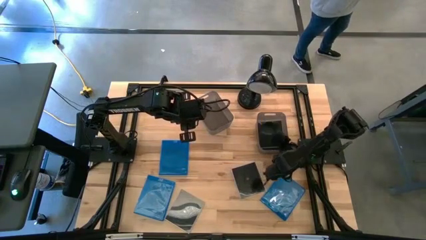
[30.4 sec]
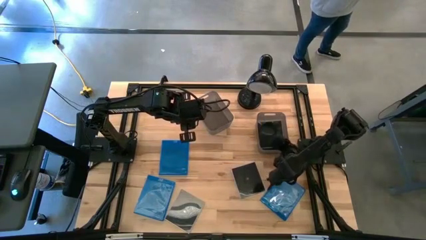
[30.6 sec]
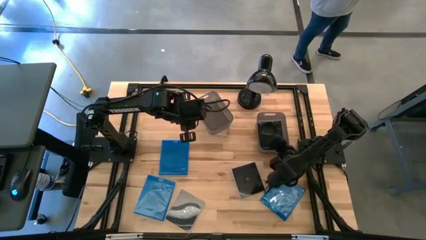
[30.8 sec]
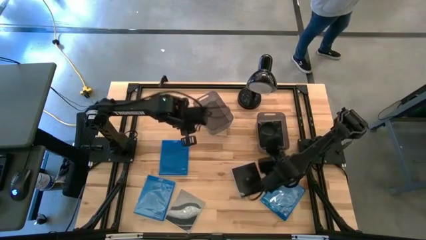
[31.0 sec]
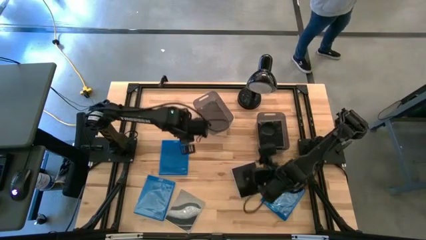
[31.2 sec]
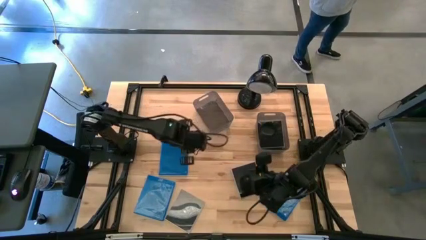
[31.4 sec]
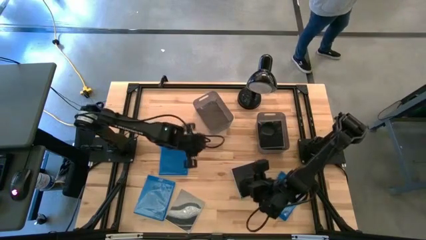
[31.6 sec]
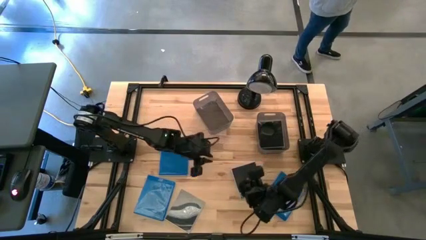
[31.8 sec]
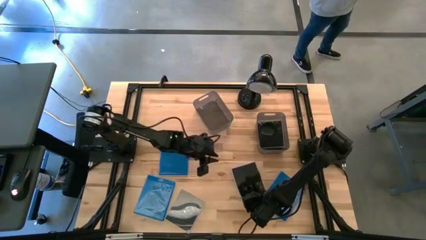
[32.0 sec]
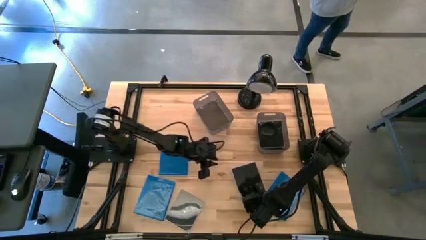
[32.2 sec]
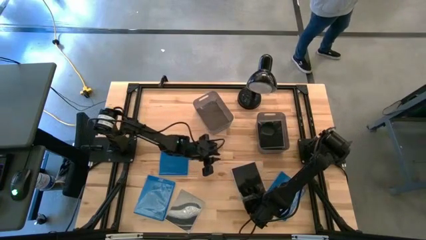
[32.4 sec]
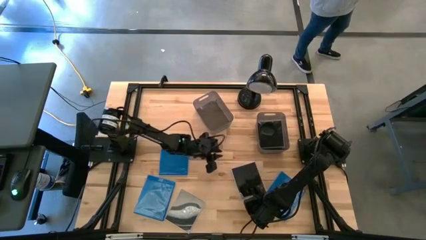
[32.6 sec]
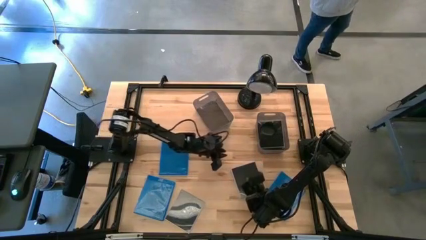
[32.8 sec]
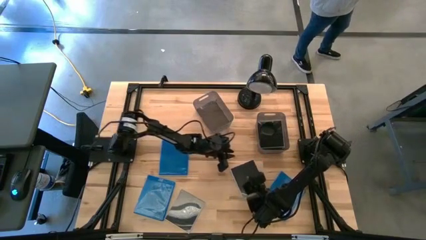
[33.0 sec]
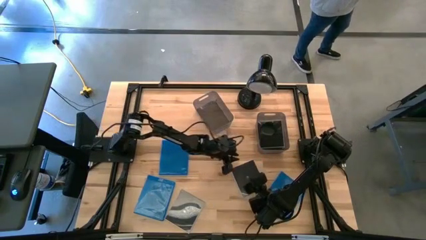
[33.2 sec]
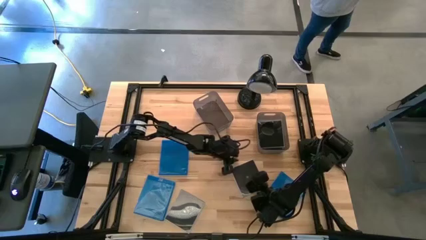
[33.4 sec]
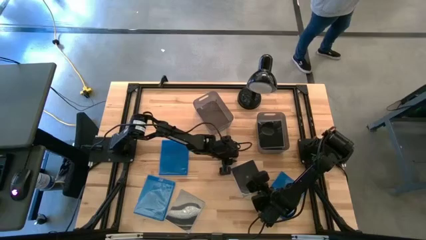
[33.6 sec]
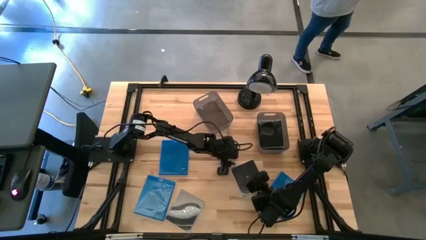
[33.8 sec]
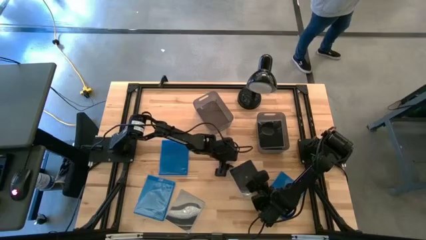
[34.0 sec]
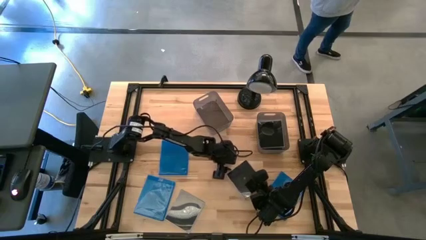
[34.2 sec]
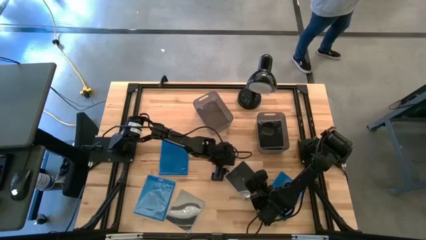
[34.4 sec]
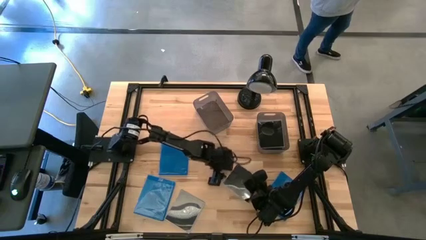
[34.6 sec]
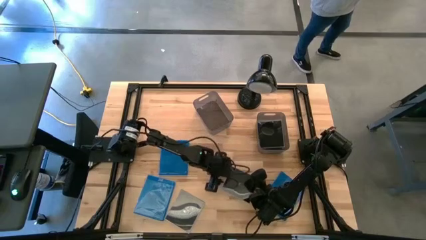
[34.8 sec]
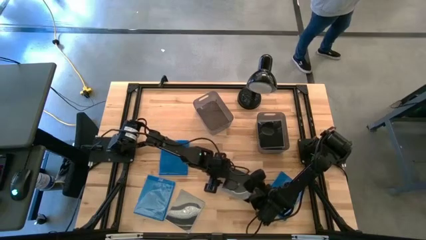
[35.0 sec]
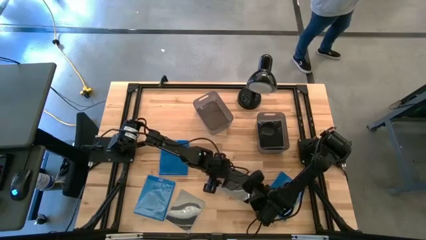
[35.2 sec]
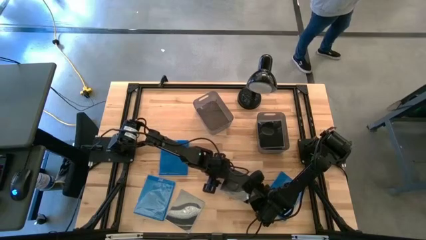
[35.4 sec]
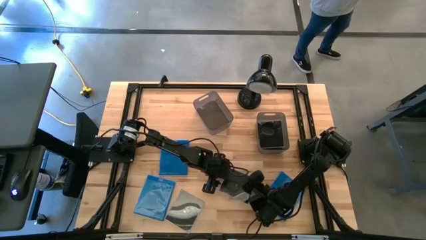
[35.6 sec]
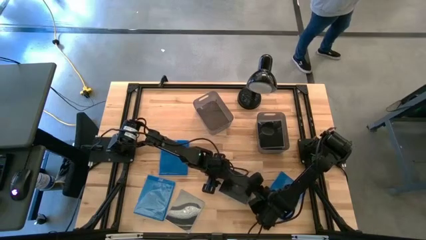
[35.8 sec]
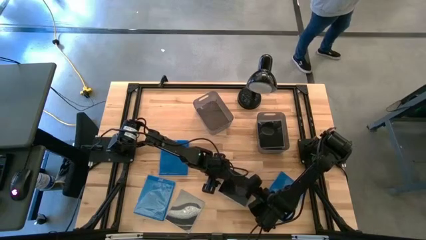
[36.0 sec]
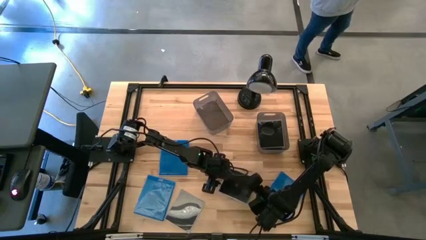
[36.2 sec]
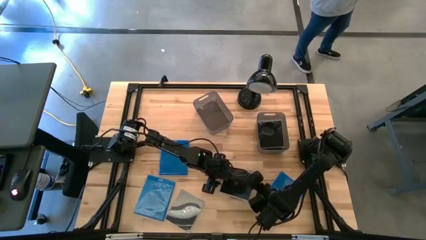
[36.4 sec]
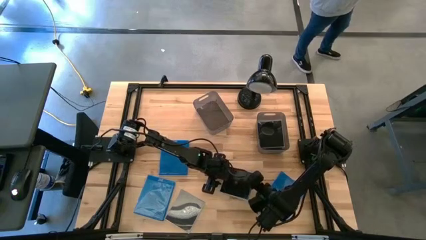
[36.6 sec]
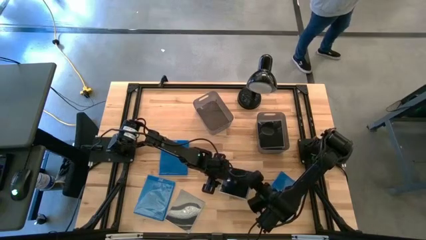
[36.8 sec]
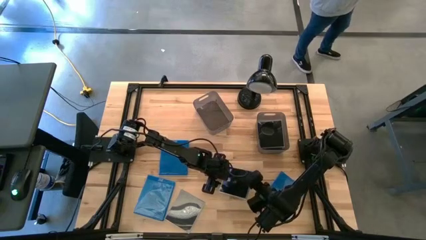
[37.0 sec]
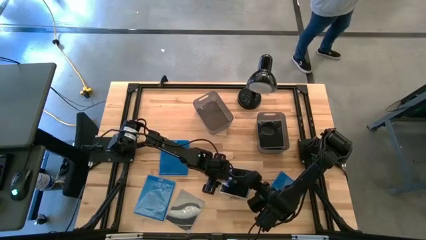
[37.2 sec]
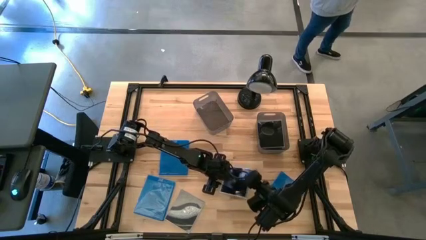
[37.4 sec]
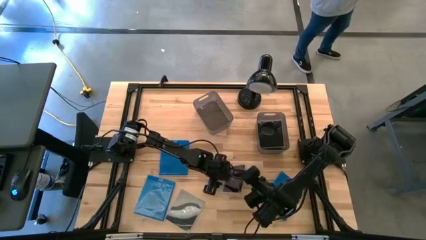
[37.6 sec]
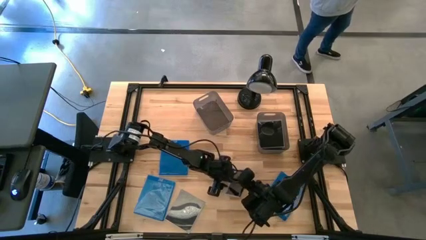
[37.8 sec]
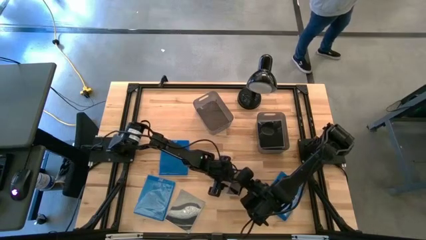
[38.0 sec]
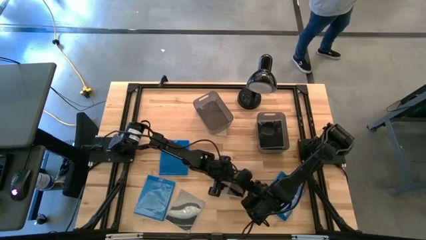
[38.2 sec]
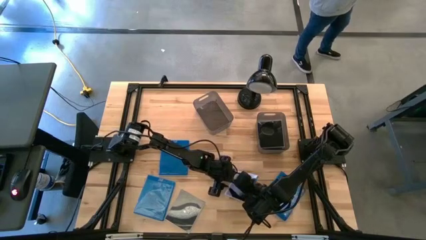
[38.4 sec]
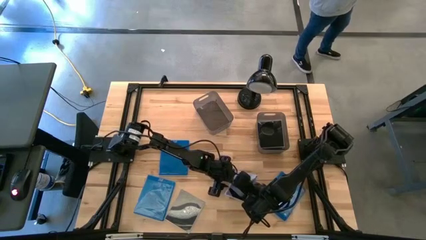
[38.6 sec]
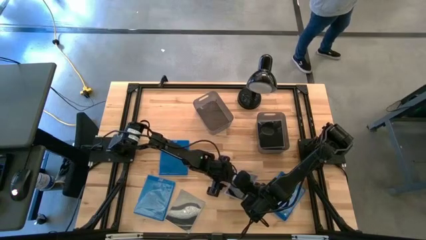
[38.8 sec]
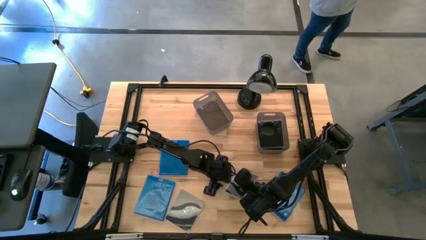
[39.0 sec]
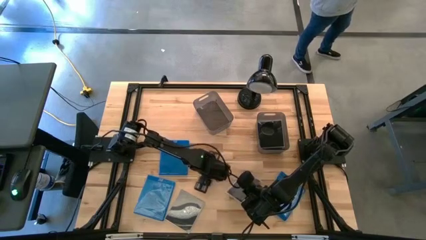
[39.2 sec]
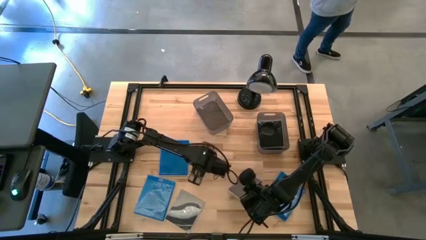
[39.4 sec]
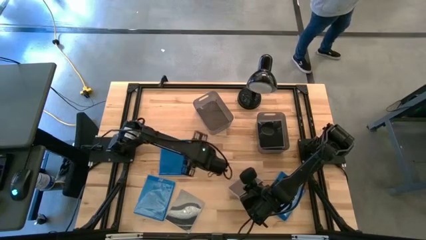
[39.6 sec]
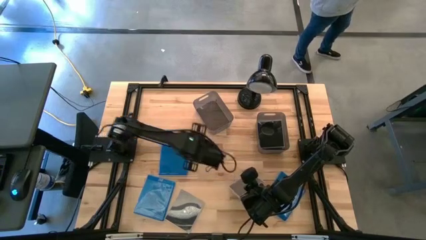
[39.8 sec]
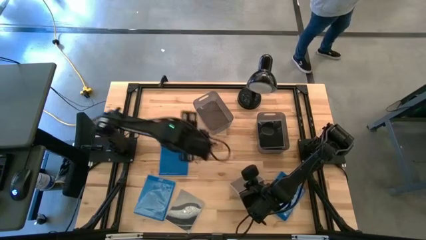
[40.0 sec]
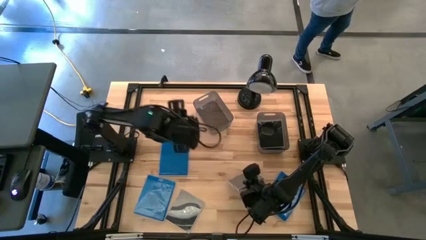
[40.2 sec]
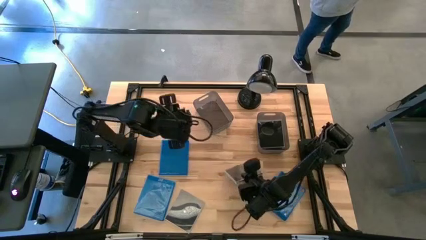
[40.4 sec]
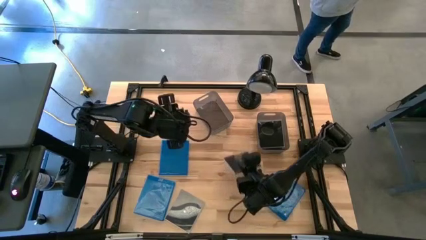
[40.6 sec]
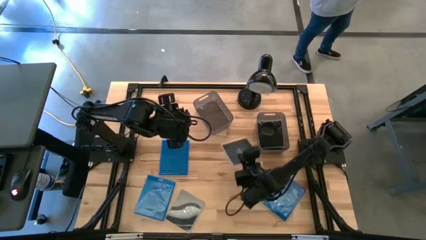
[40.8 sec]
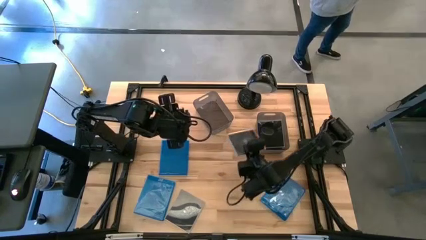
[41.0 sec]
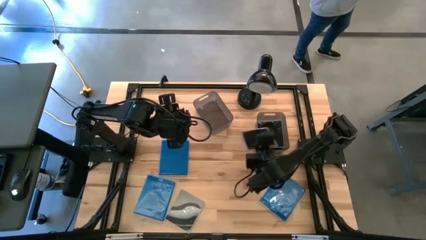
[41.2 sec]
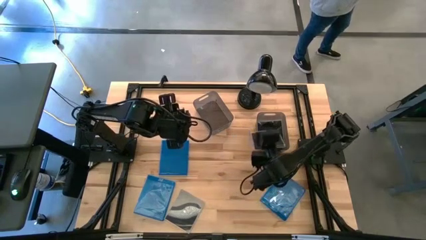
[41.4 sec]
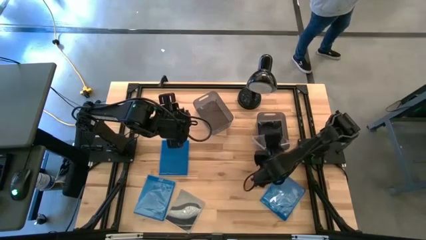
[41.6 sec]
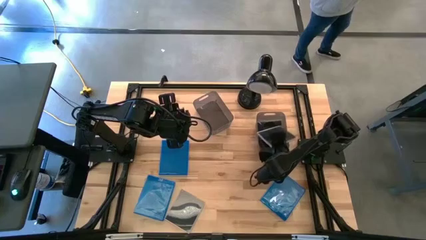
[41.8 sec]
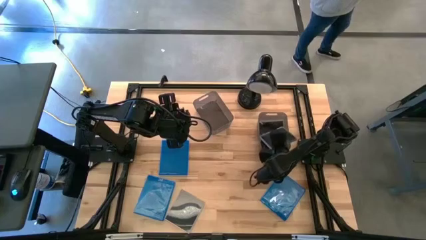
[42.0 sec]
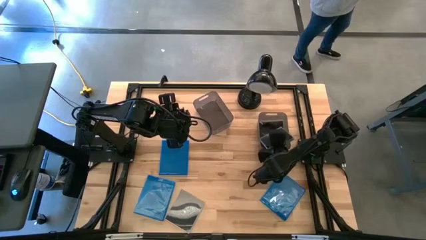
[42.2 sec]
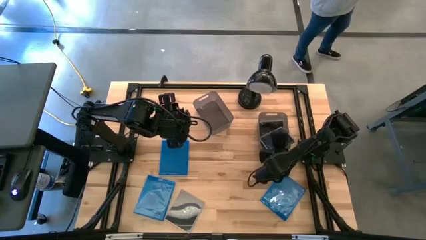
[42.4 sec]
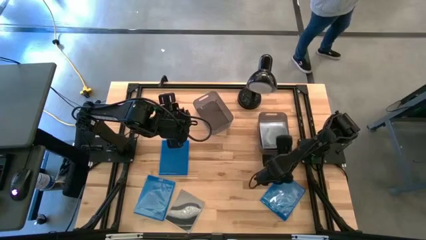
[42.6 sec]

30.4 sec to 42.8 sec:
Task: Pick & place jewel cases by type
Put the right black CD case into the right black bin
